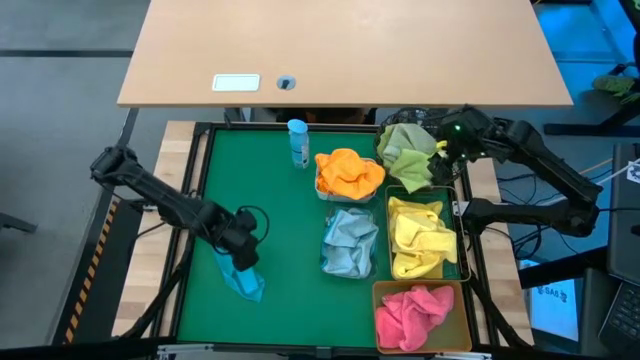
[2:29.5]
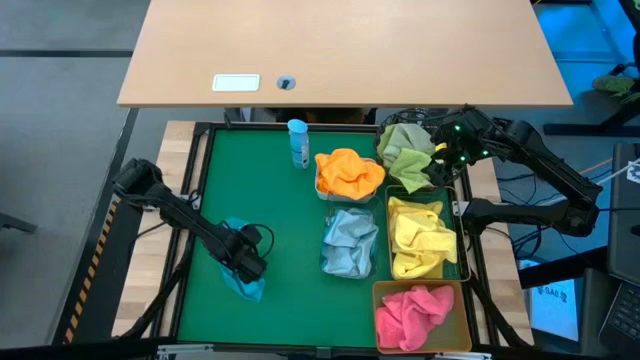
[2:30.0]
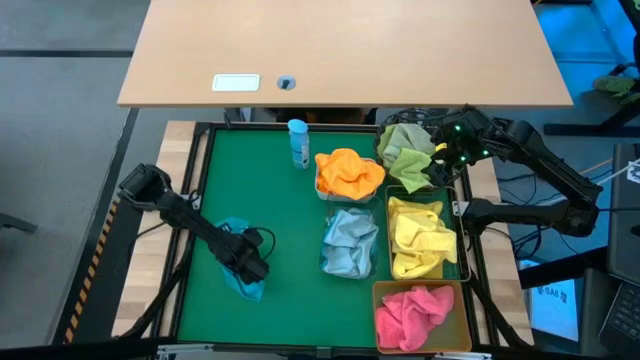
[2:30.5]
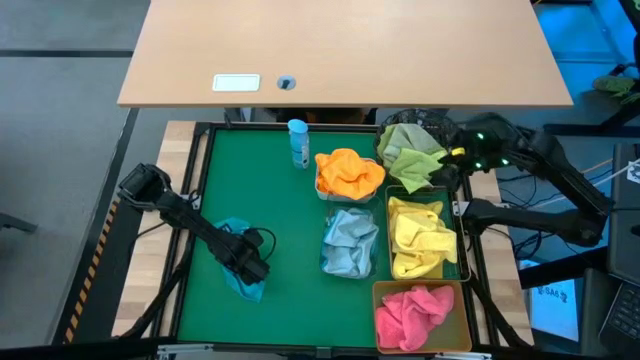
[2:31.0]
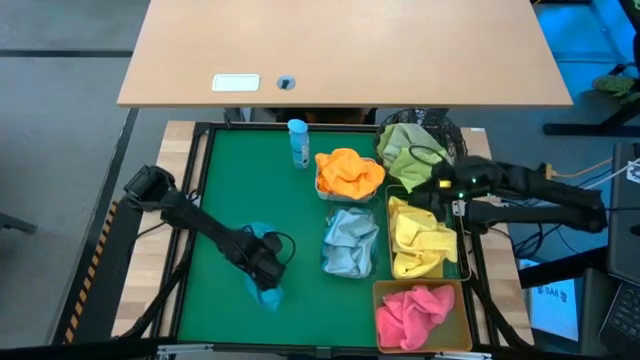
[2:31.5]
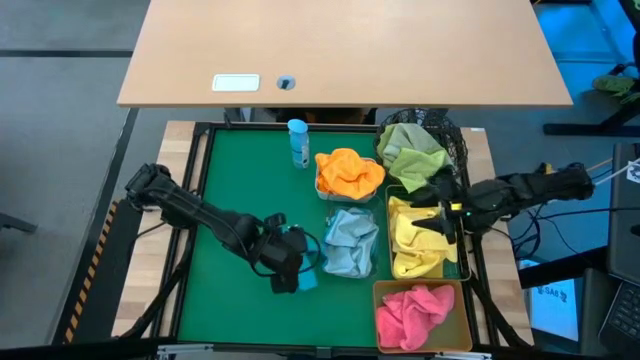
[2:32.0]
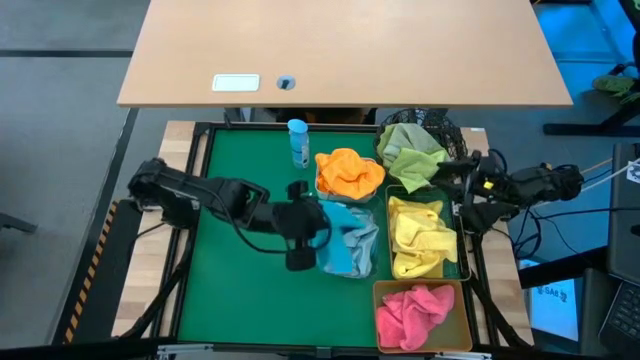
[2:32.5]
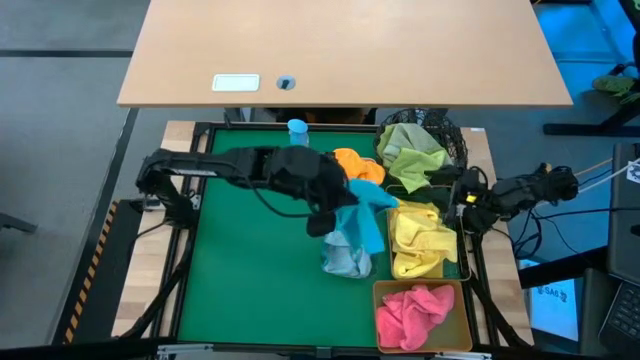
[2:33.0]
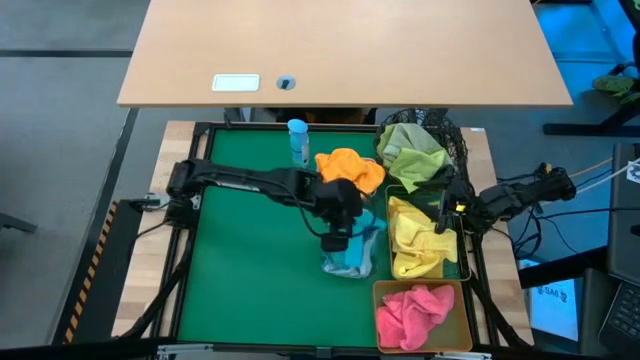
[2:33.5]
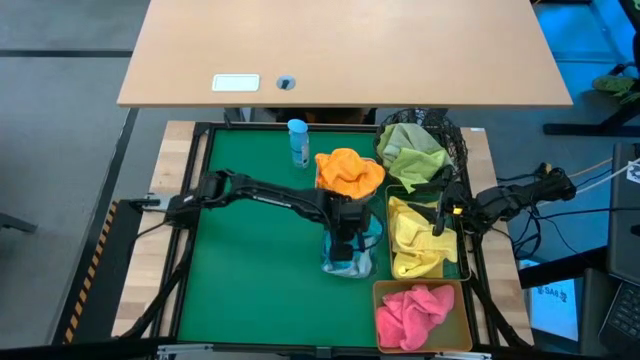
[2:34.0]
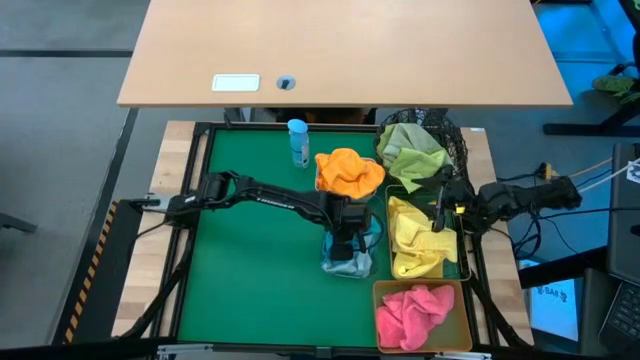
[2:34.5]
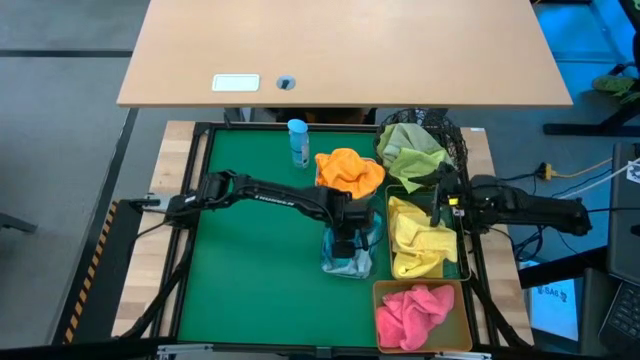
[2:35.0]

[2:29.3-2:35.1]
Task: Sort microfiber towel by color & place in baskets
Put the blue towel into the transparent bin

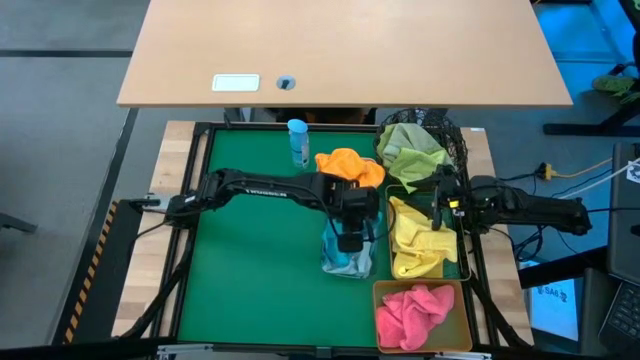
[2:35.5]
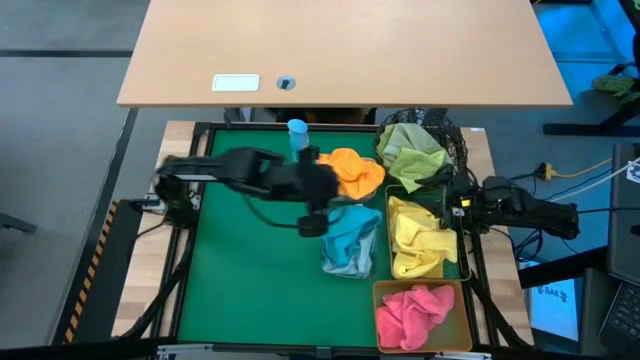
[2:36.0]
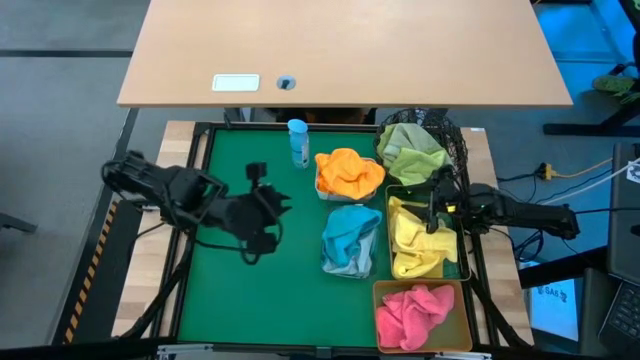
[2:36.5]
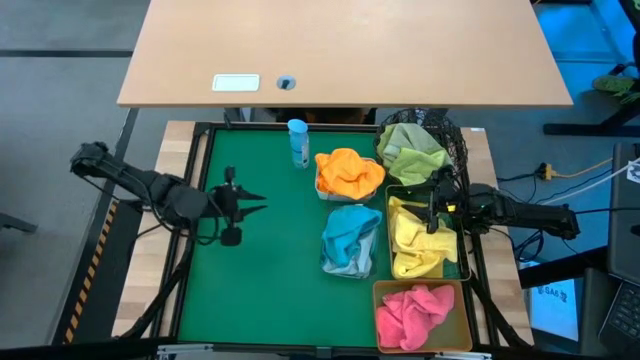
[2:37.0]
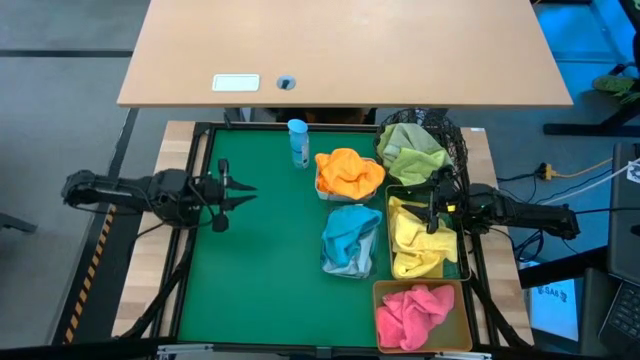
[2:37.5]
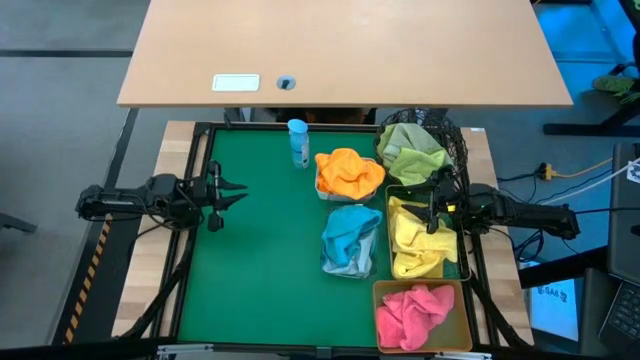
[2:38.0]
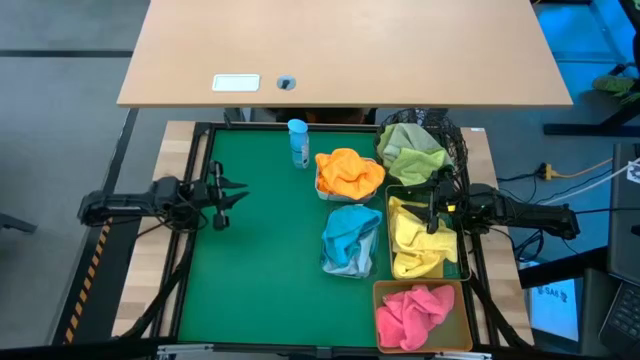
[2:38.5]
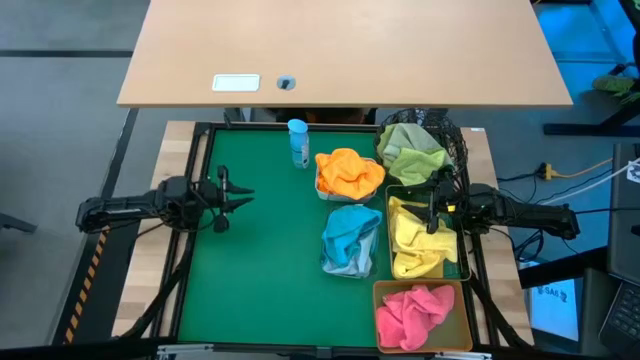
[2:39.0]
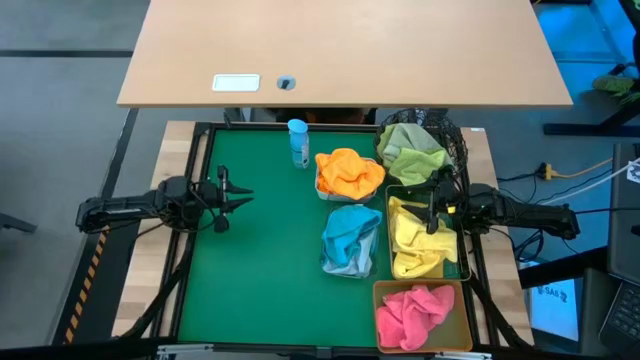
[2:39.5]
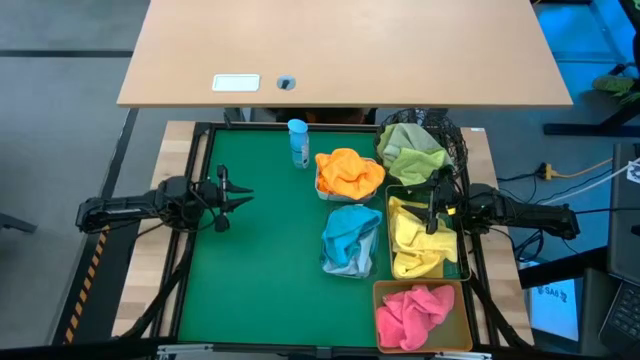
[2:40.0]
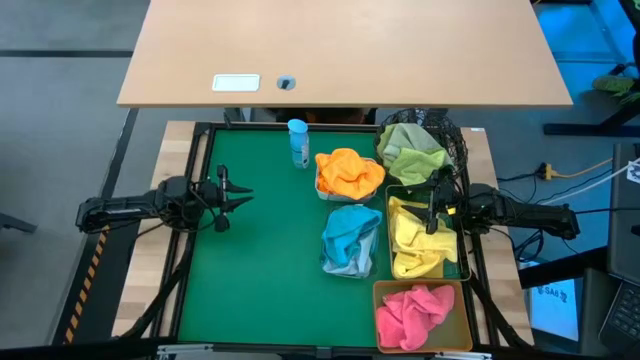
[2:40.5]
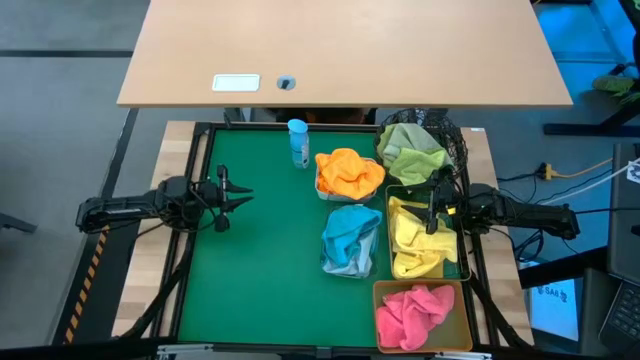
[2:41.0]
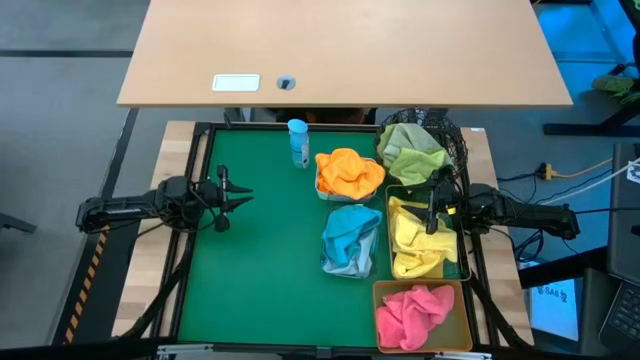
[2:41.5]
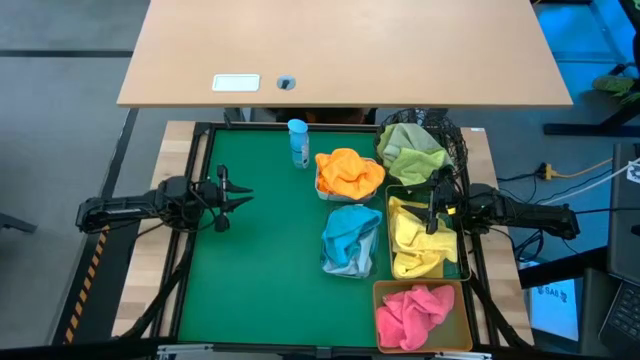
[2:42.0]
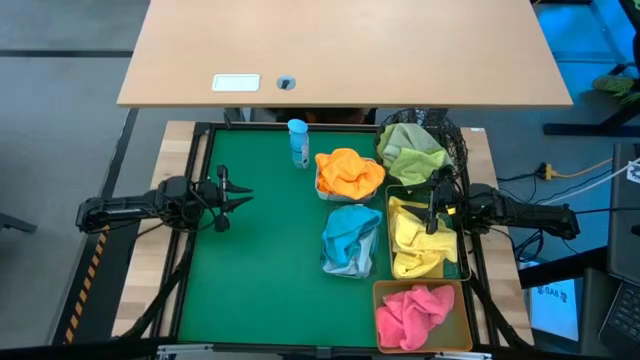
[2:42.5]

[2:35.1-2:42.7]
Return to Home Position

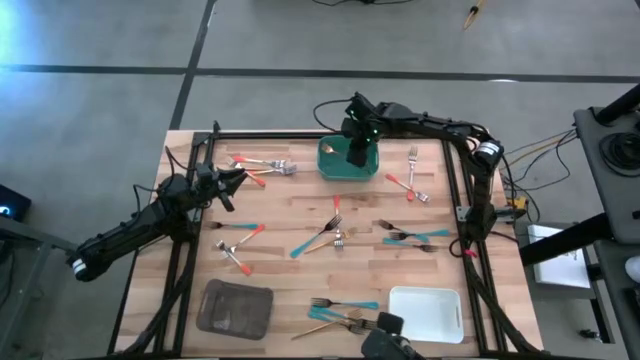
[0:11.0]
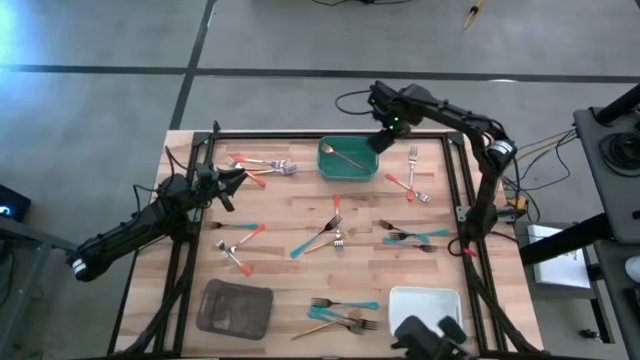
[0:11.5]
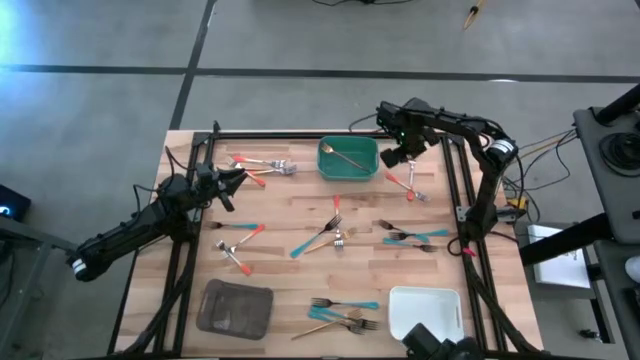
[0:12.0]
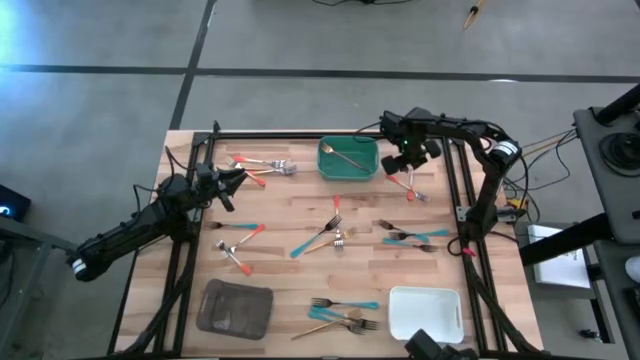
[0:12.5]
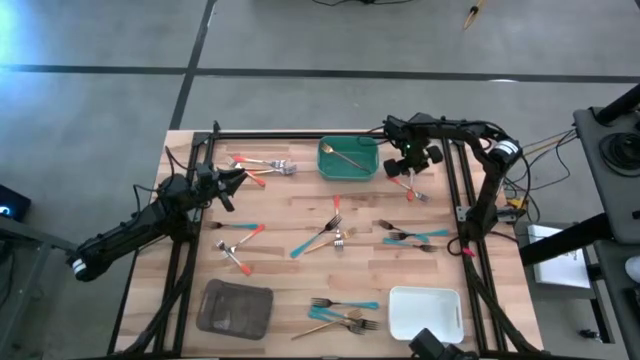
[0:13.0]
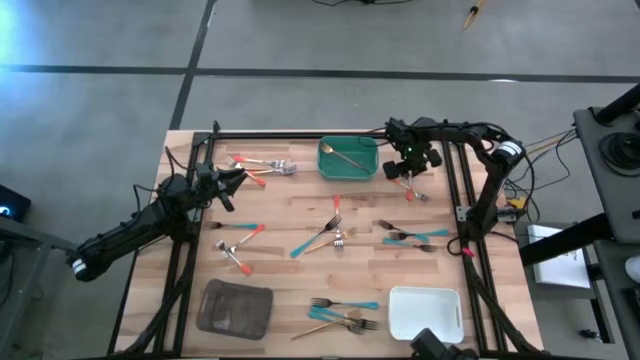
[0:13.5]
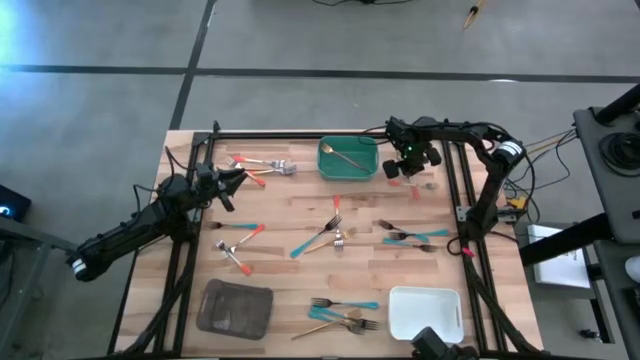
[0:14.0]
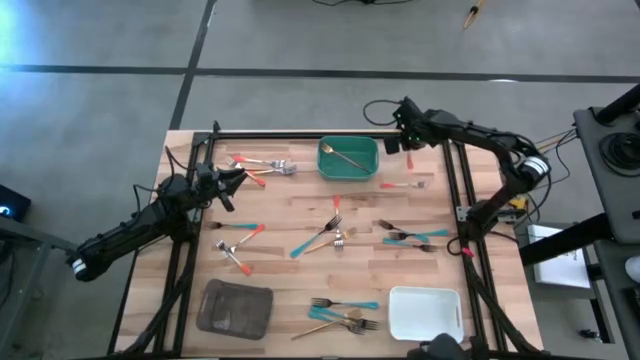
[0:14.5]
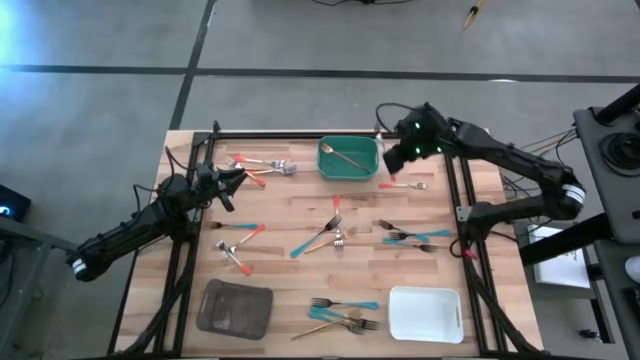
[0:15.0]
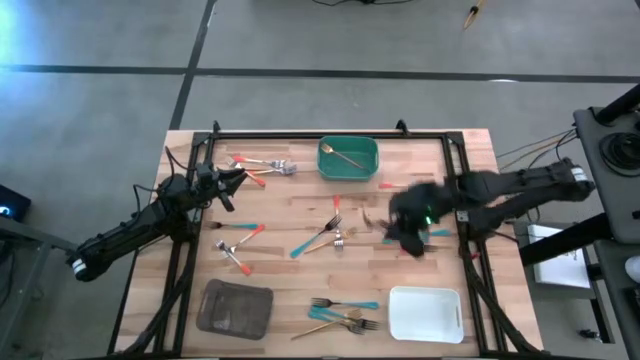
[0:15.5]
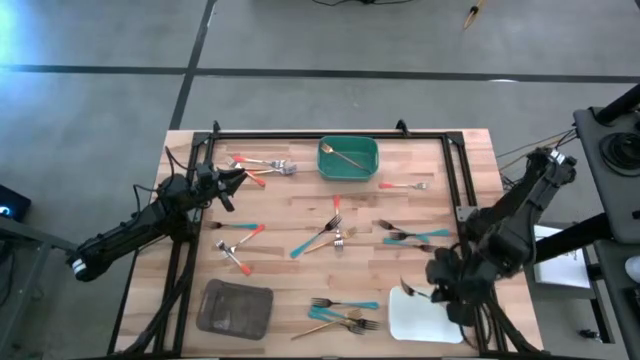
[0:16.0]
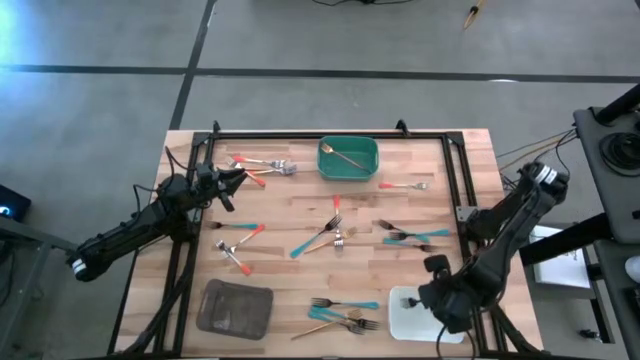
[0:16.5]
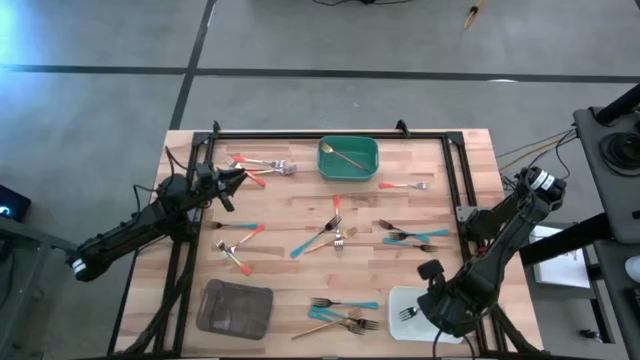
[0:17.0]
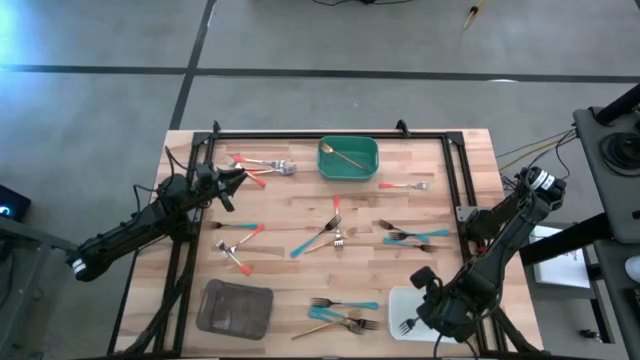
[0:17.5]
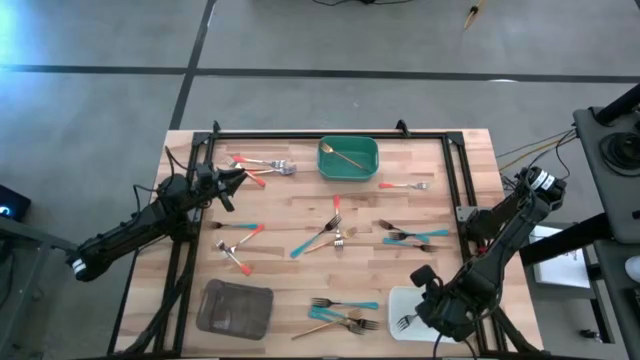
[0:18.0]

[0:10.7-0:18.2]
Task: Sort silverware by color (type)
Put the orange fork into the white bin
